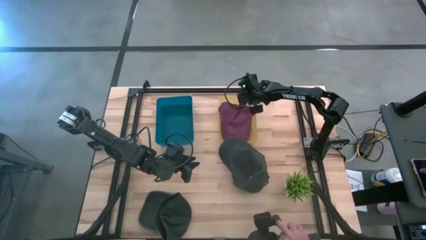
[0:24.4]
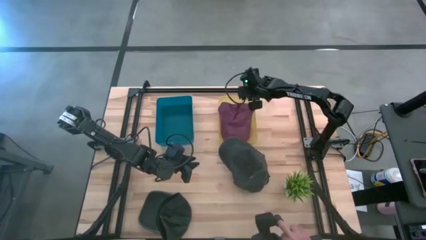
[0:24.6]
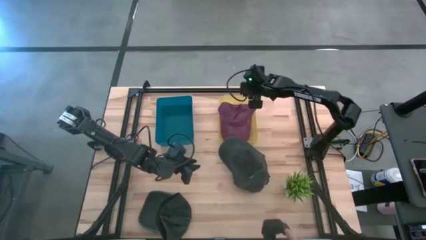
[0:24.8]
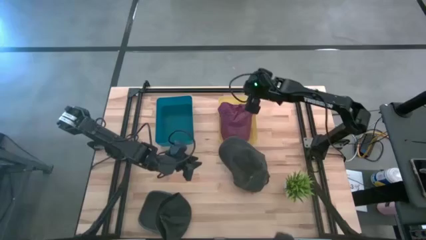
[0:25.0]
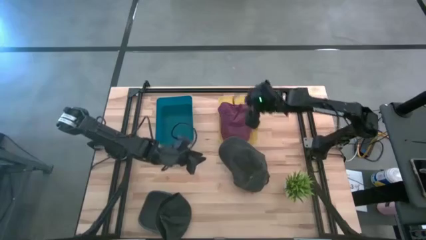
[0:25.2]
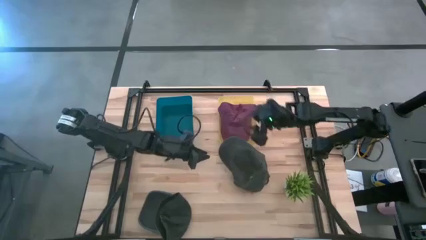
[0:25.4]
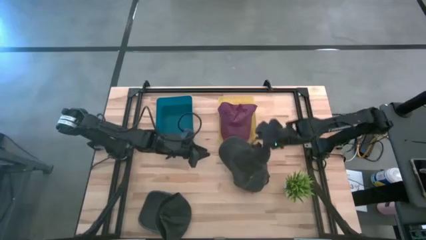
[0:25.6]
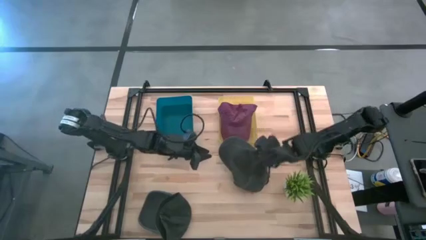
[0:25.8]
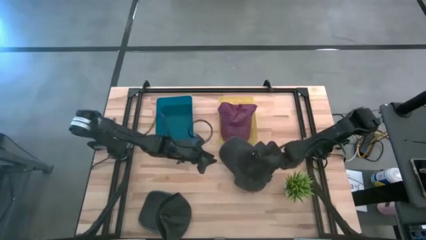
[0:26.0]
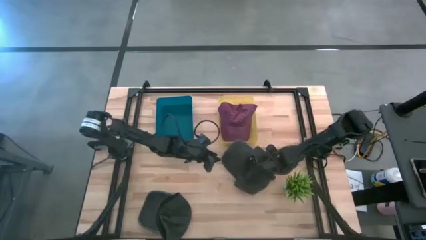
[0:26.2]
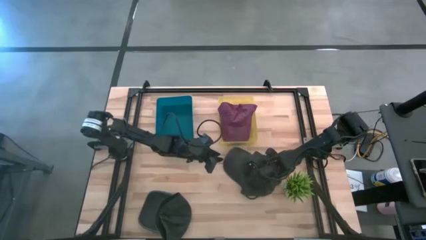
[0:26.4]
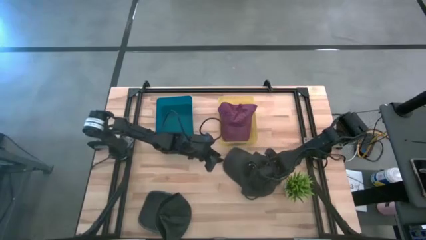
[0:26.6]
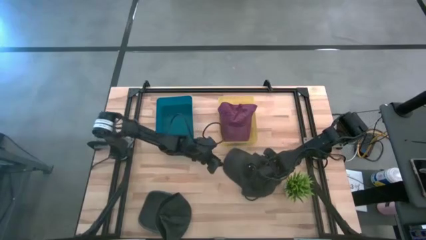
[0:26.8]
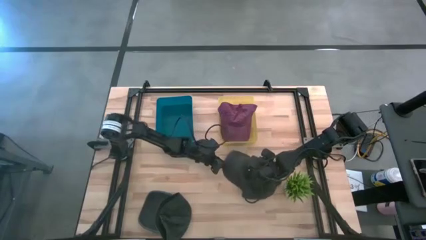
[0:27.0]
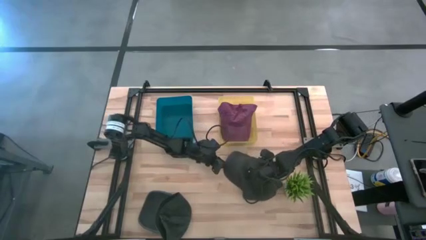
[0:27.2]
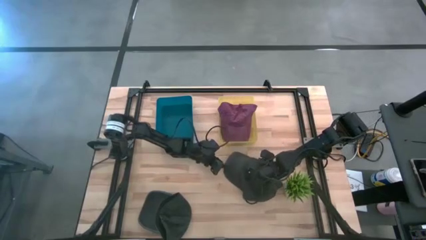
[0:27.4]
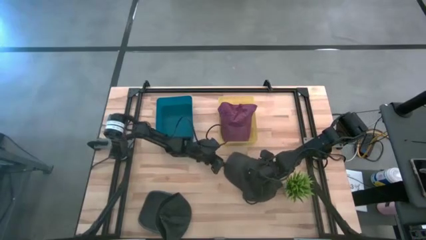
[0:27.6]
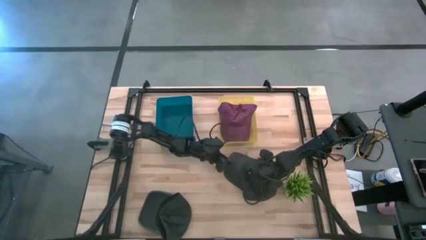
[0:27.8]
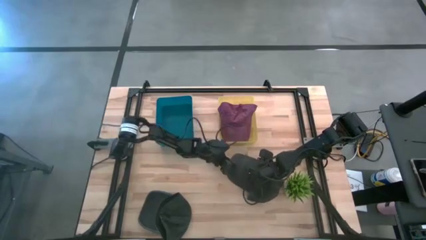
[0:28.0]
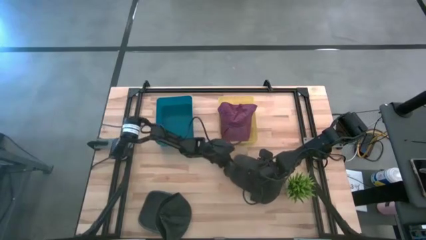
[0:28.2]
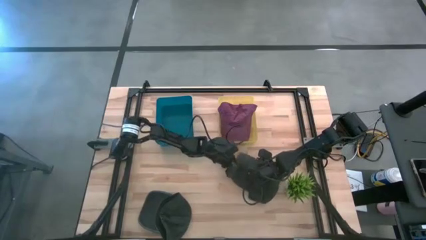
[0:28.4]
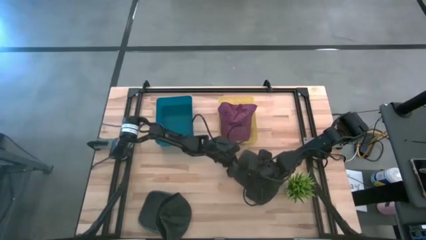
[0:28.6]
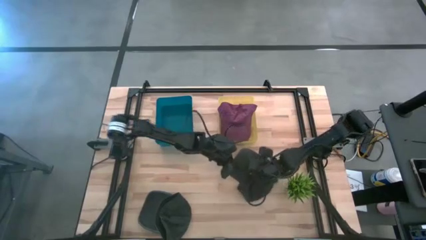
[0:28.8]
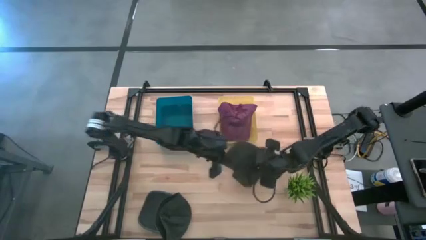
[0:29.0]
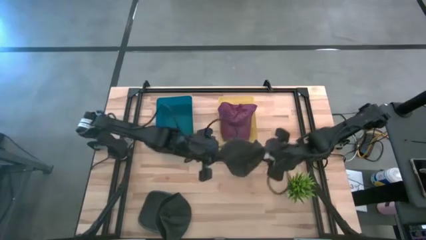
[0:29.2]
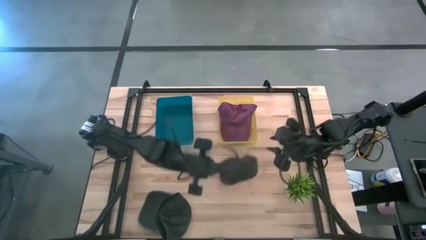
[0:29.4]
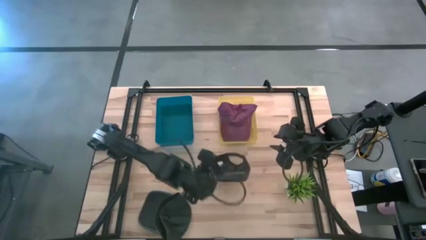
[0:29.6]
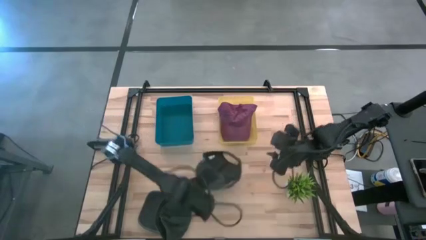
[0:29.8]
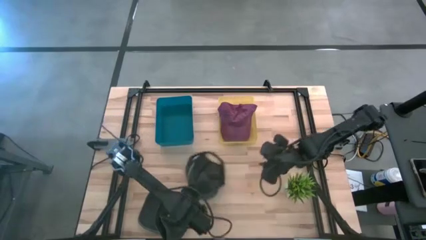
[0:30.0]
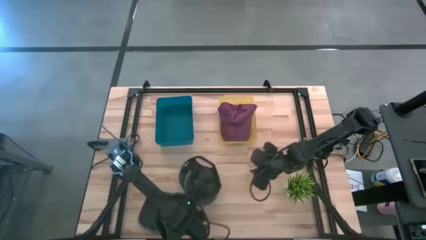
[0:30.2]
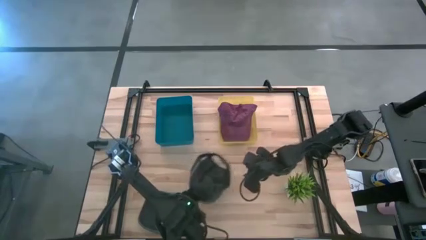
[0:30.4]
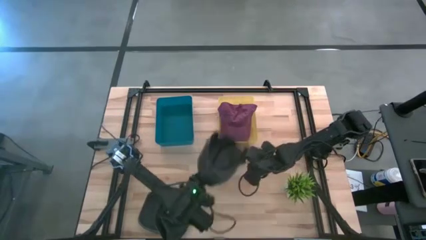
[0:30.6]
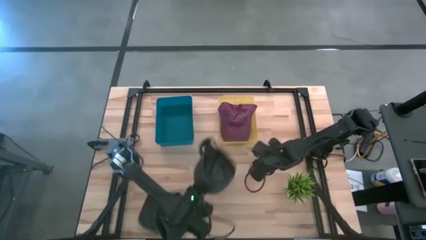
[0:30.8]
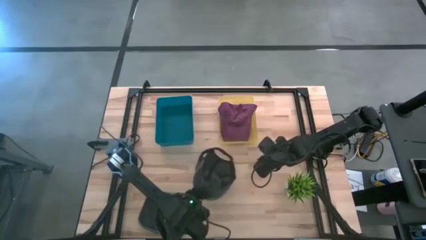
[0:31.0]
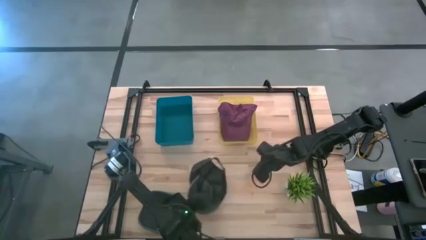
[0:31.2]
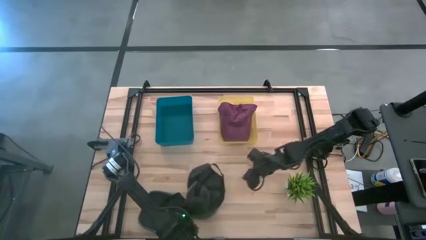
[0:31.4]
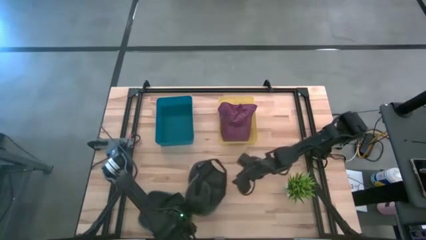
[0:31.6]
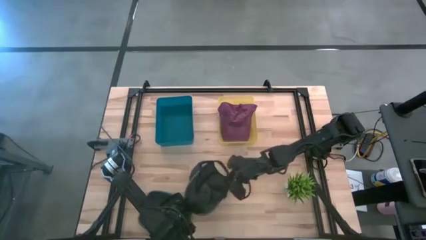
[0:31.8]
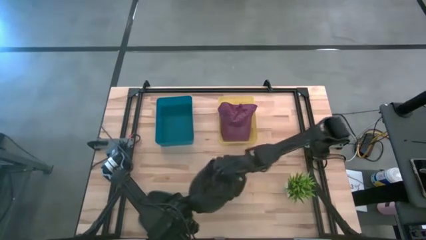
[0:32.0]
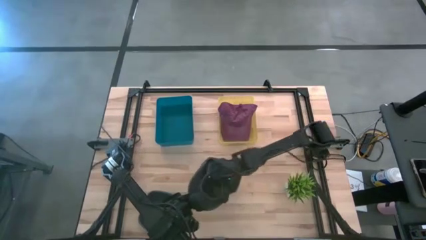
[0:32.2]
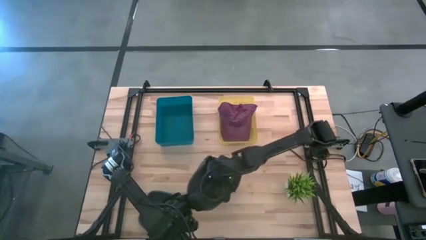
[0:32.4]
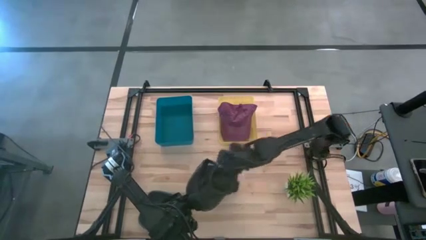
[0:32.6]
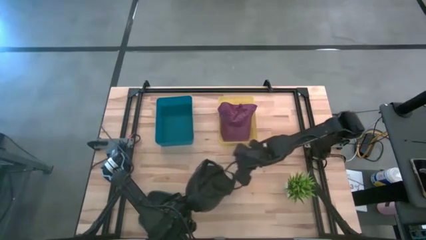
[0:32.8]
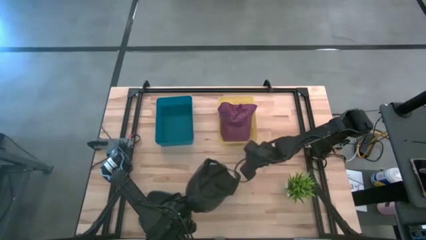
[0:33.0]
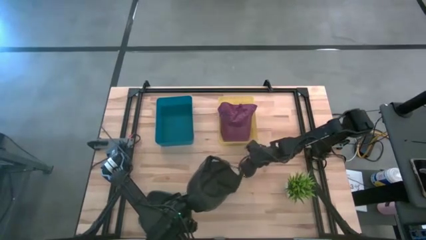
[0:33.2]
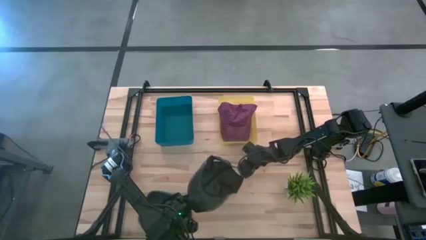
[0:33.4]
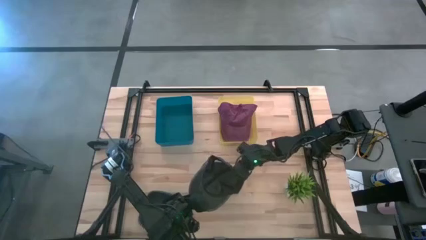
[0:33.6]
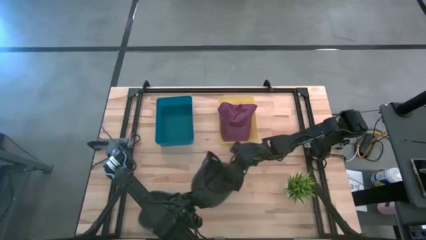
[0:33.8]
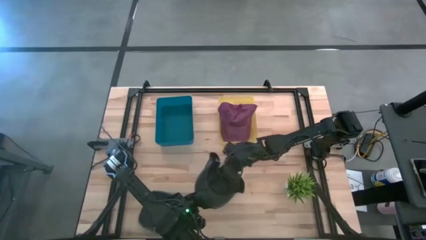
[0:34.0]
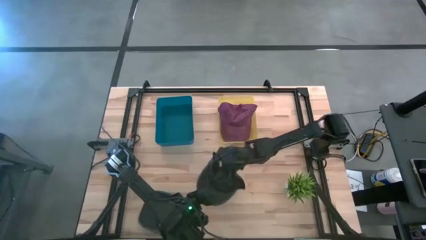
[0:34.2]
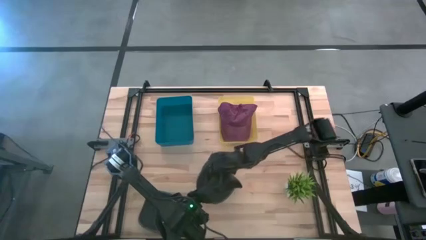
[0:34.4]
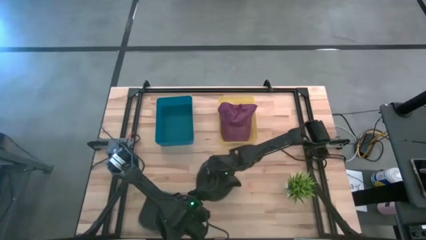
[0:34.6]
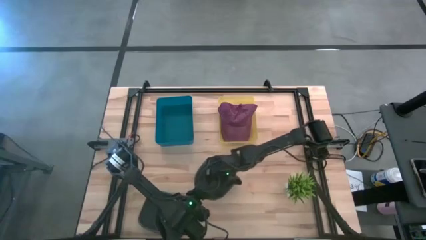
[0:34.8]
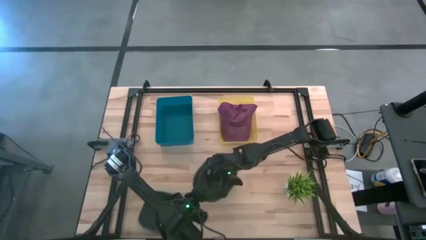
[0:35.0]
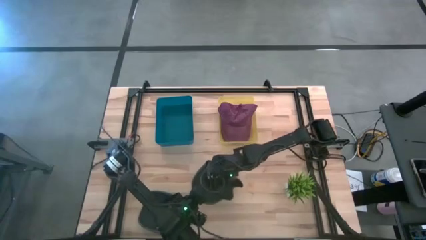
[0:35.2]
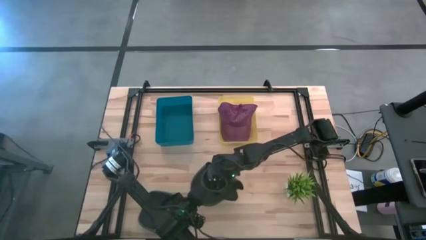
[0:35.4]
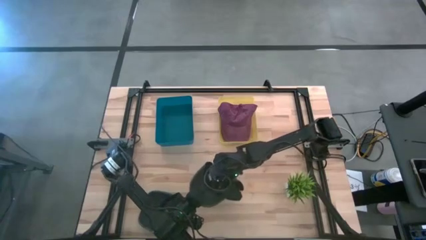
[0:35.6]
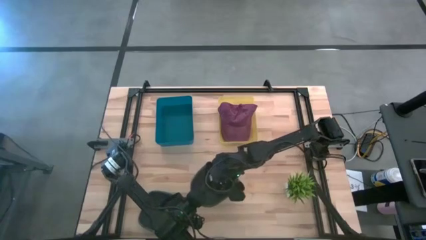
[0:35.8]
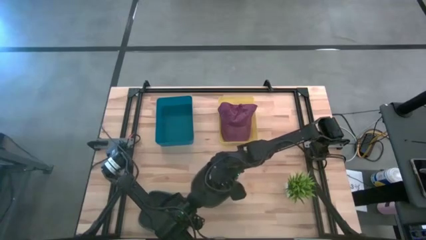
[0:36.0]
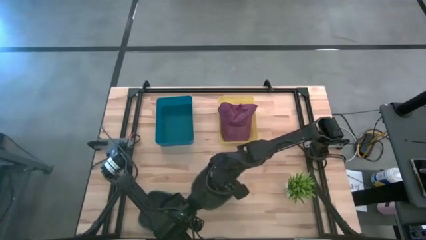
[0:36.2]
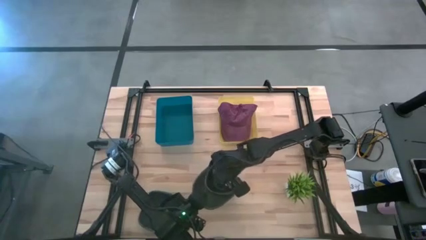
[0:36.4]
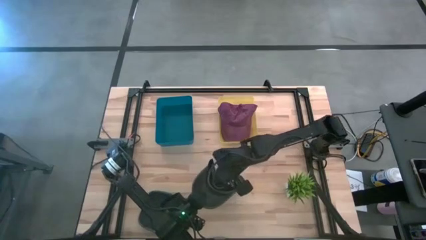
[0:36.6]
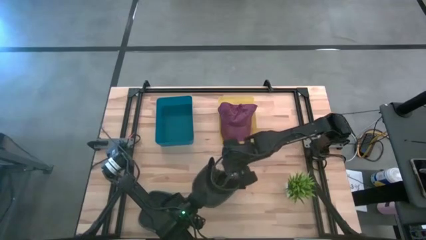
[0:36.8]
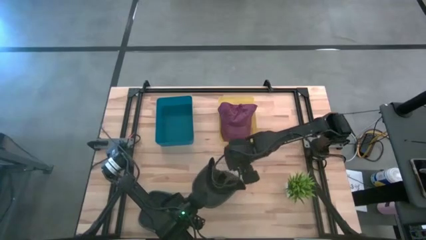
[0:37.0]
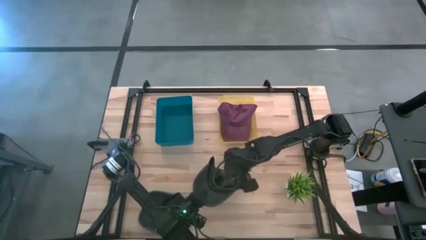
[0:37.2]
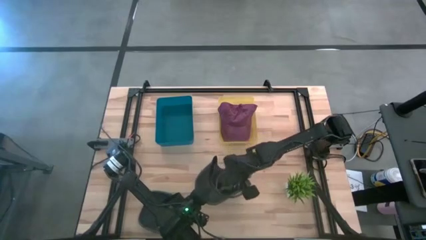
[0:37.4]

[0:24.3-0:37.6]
Task: Pick & Place hat
Put the top black cap into the blue bin

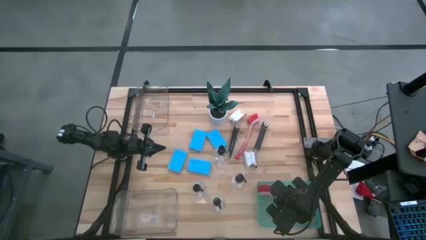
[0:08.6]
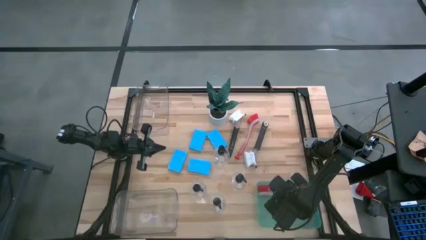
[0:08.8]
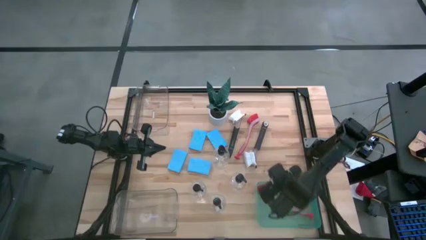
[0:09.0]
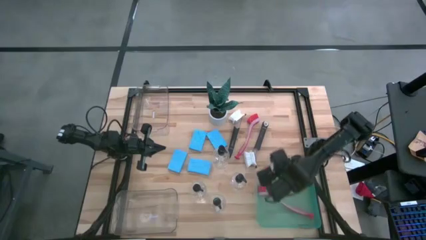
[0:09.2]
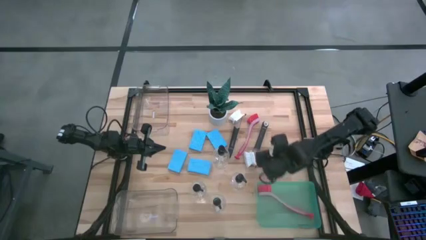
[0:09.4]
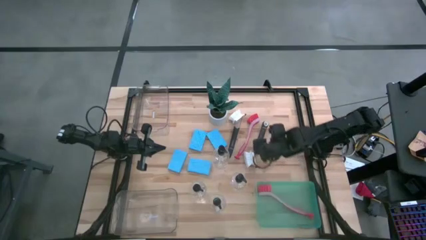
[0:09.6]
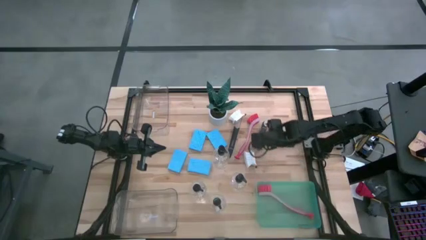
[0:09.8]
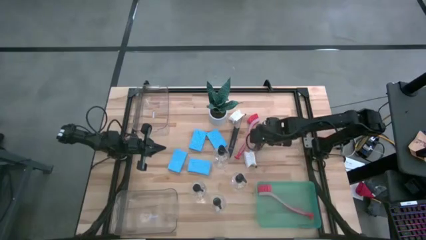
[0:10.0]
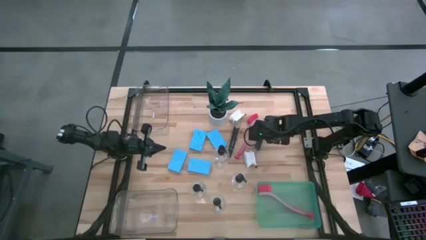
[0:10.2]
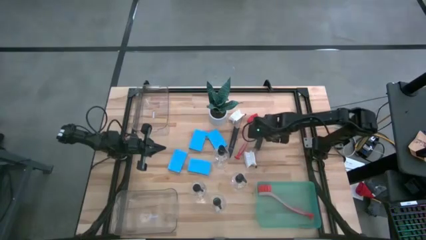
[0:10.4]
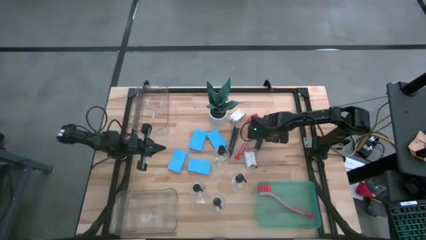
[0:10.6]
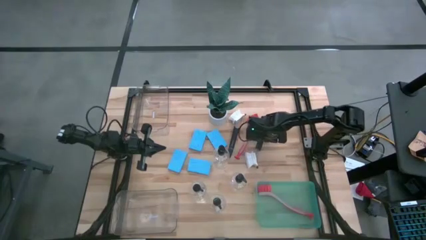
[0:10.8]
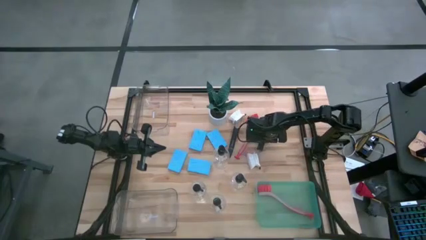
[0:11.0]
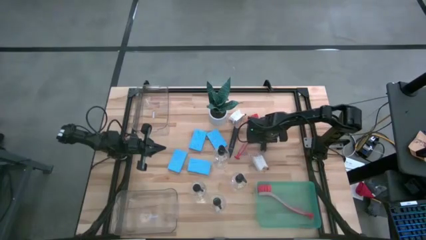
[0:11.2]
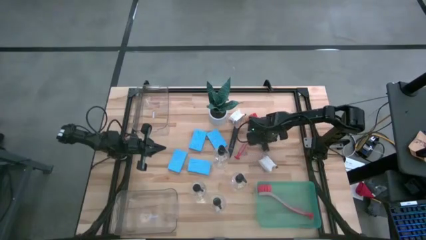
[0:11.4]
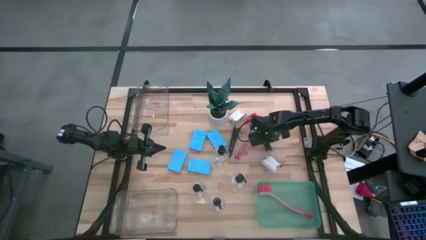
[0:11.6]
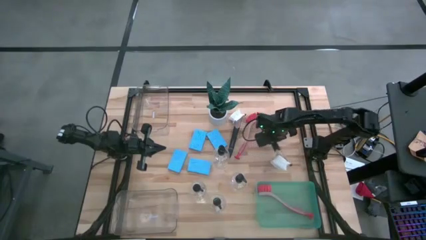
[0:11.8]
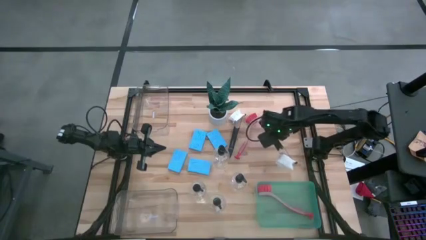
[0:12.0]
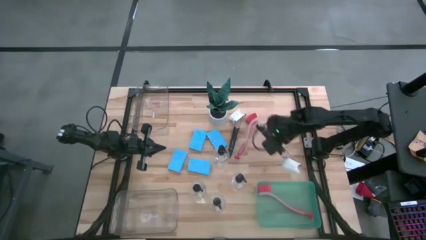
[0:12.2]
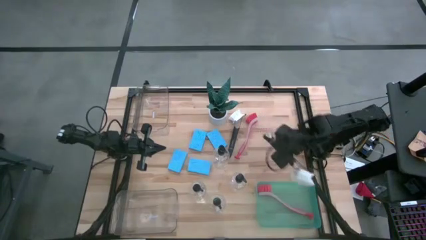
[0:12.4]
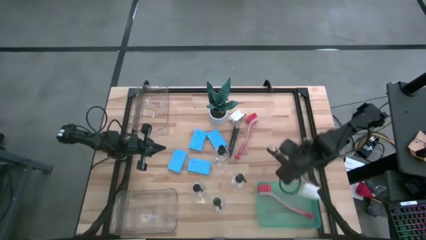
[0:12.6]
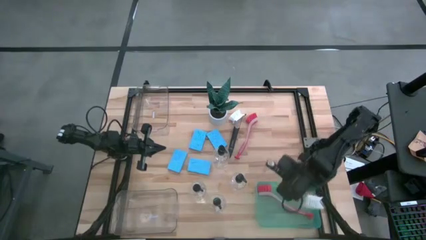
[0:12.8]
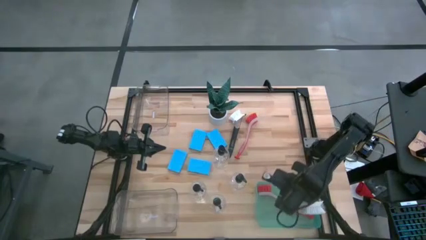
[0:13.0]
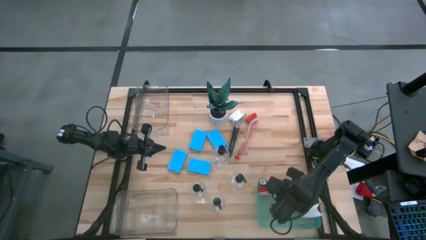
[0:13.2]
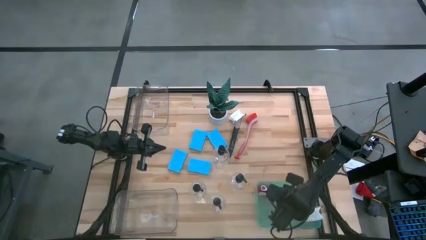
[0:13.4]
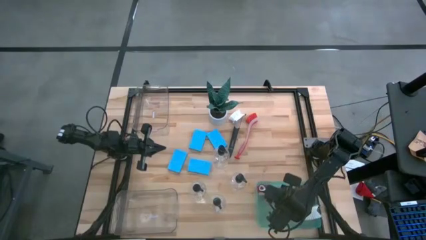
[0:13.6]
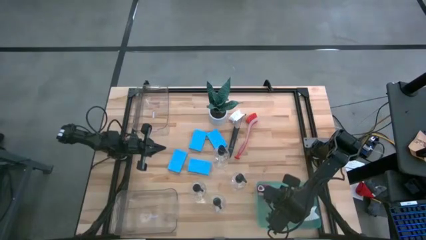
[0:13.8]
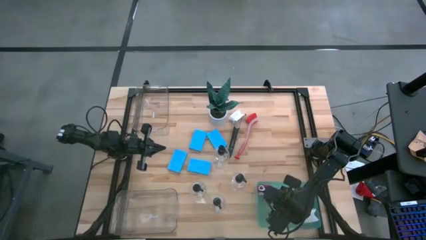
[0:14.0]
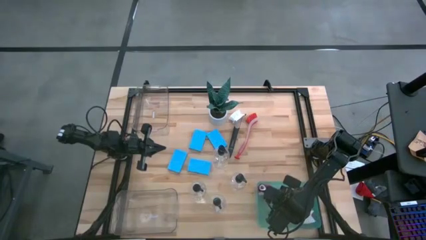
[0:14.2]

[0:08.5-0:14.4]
Task: Pick & Place Kitchen Sink Supplies
Put the black dish brush into the green bin
